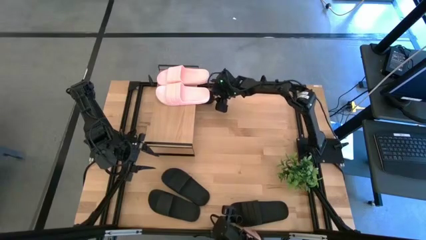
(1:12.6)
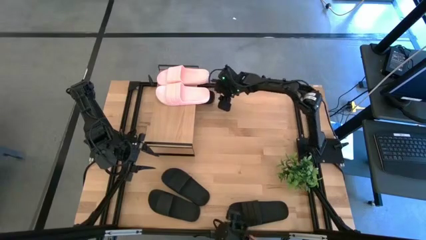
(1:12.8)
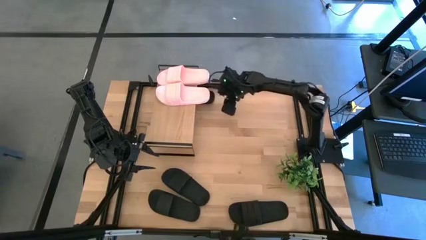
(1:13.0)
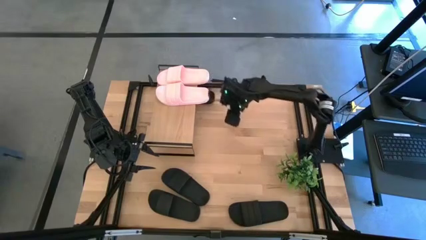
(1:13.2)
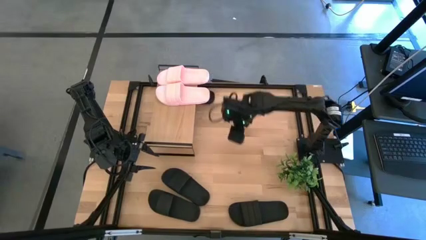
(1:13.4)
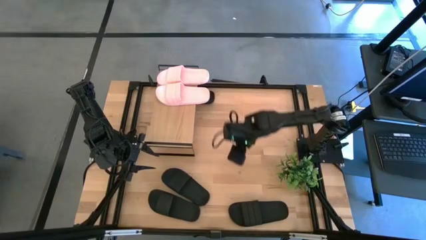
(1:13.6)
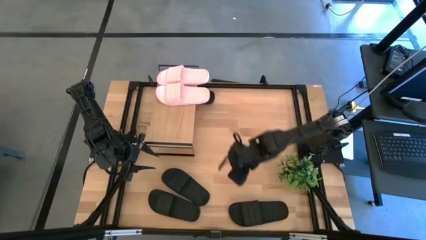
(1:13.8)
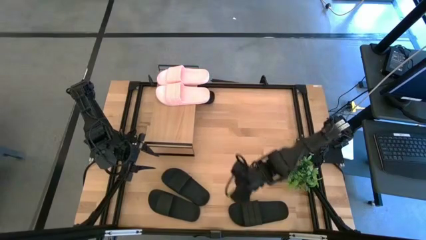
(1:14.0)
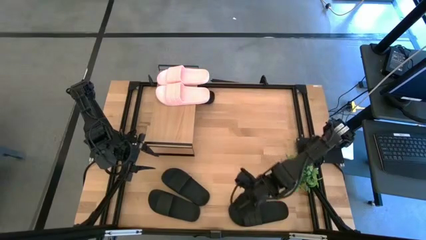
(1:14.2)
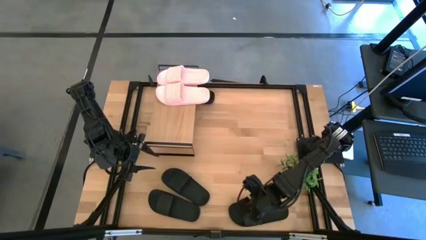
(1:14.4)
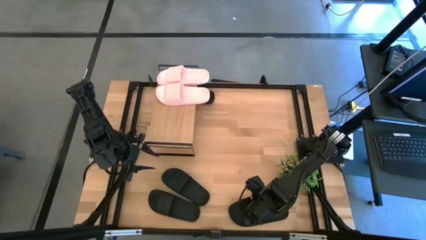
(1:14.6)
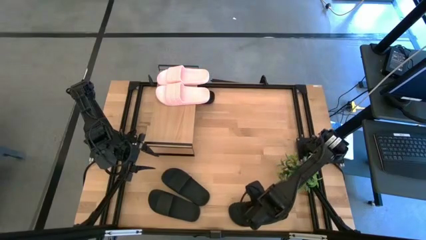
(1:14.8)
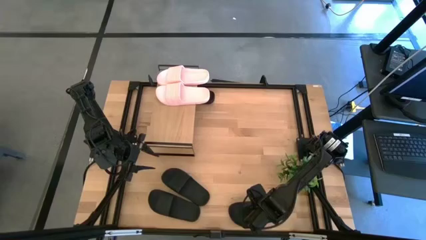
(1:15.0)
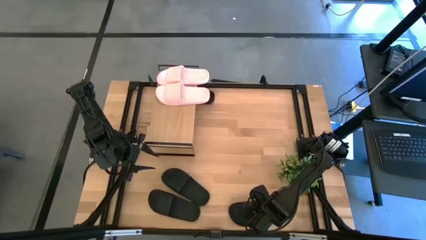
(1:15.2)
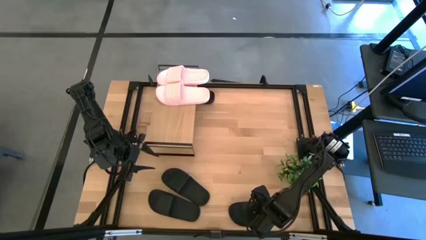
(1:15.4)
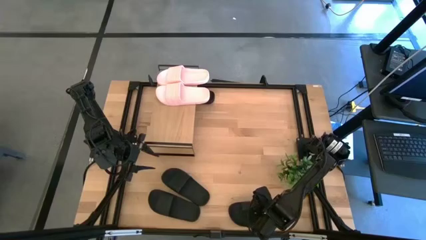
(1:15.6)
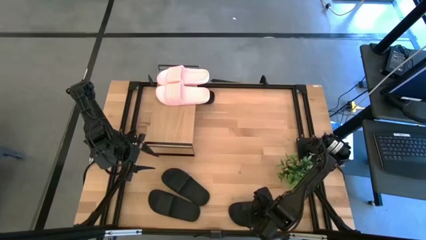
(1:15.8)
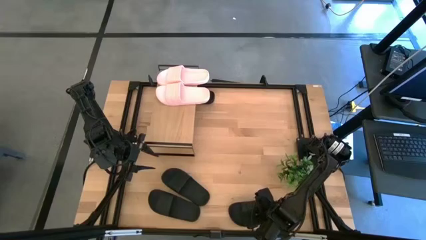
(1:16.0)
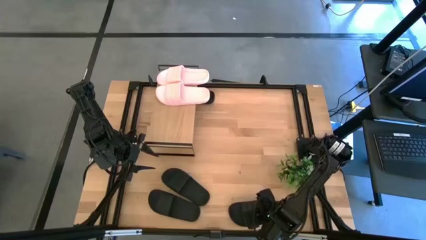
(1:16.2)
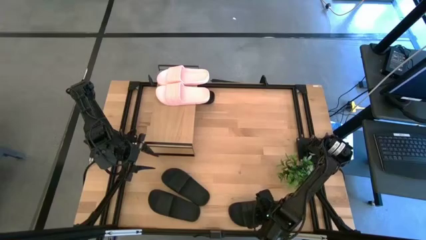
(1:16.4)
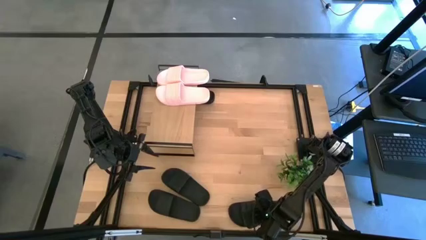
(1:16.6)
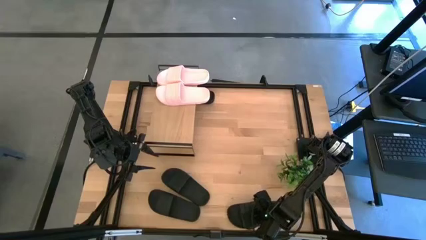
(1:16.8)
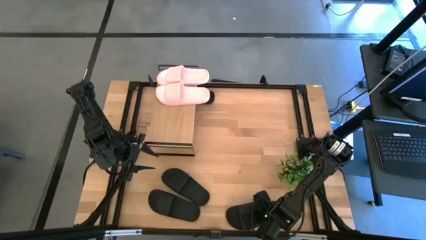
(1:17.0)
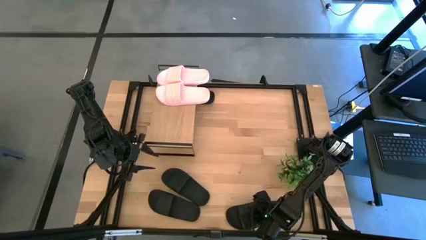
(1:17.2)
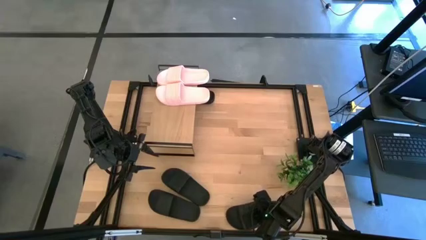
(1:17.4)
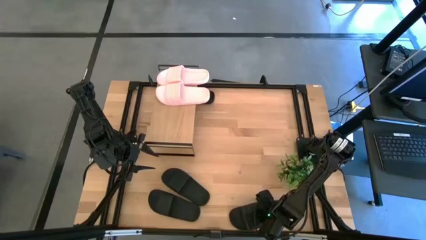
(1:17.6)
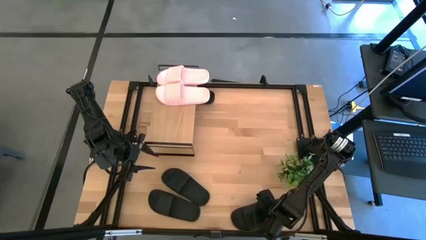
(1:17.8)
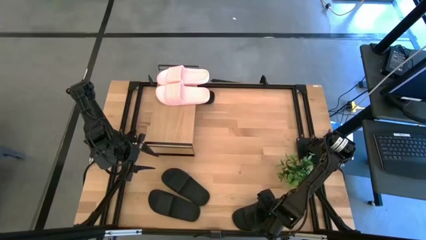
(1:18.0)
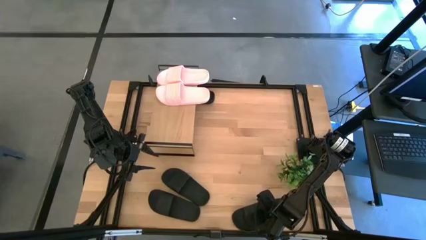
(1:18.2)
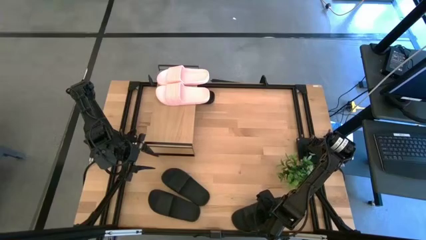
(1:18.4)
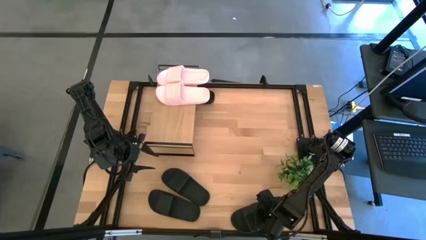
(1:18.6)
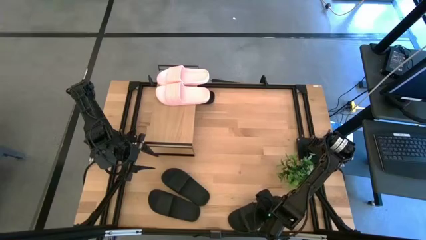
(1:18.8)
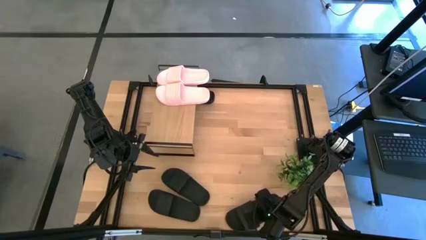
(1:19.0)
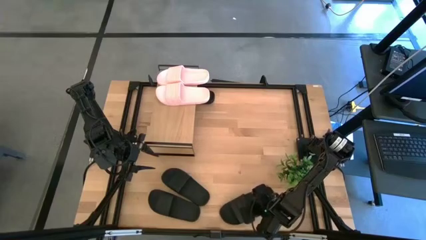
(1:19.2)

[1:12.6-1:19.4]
Task: Pick and place slides into the shelf
Put the bottom right black slide under the shelf

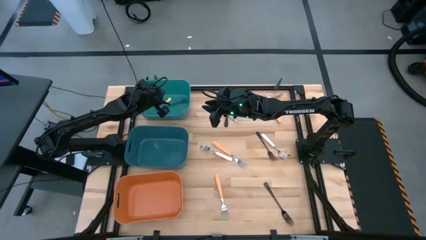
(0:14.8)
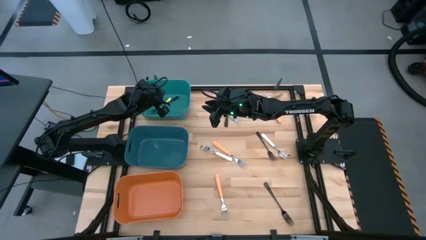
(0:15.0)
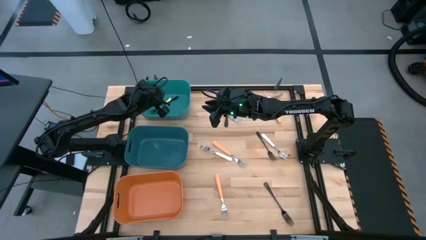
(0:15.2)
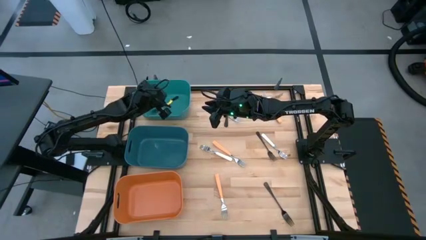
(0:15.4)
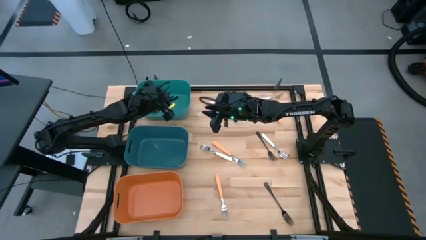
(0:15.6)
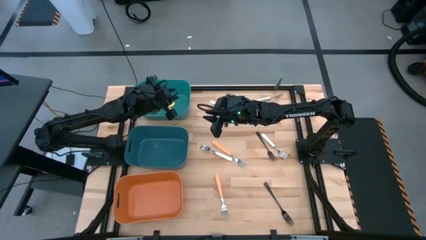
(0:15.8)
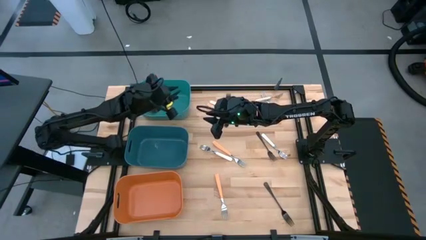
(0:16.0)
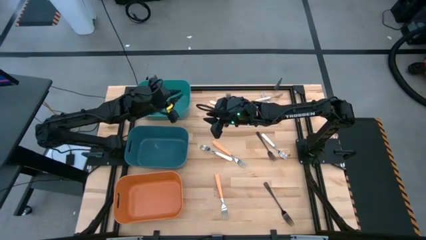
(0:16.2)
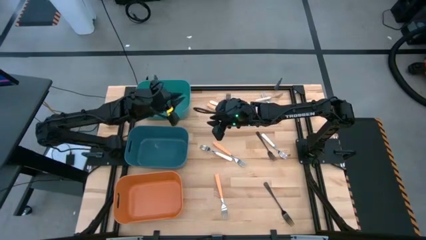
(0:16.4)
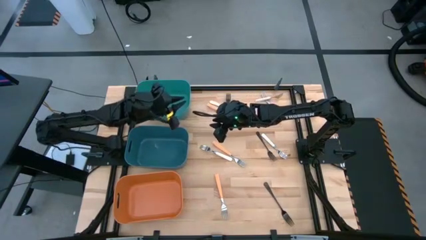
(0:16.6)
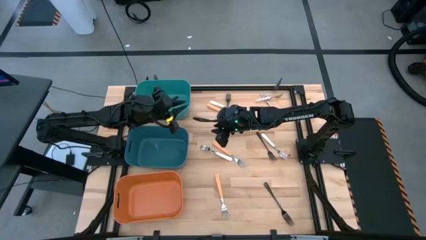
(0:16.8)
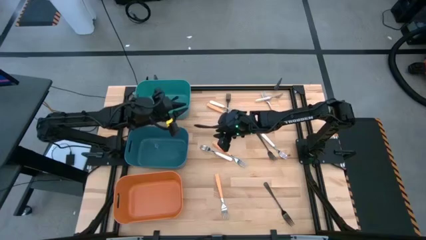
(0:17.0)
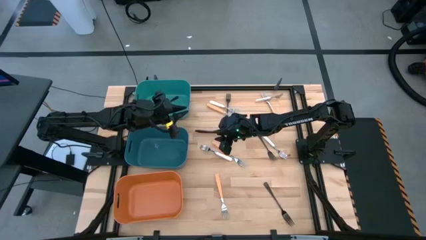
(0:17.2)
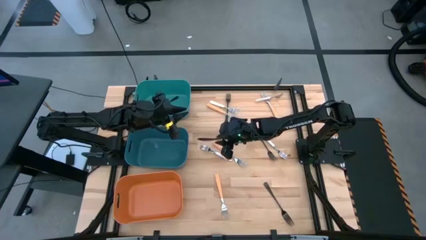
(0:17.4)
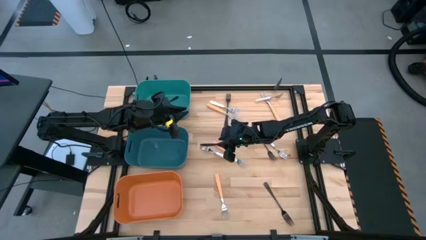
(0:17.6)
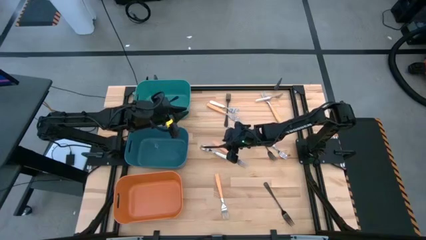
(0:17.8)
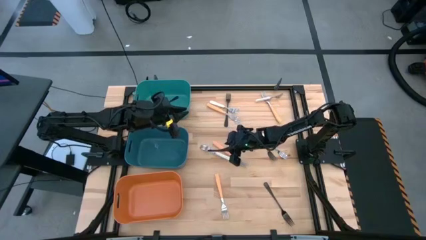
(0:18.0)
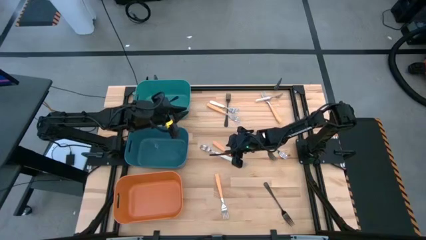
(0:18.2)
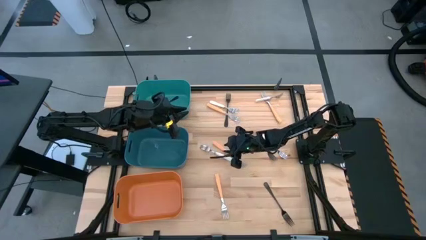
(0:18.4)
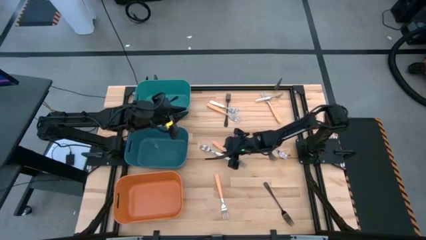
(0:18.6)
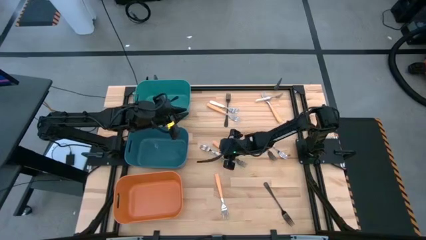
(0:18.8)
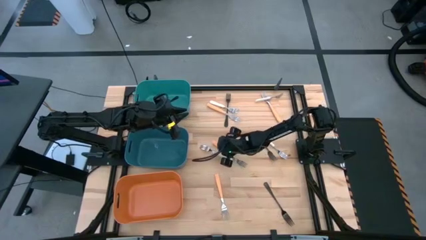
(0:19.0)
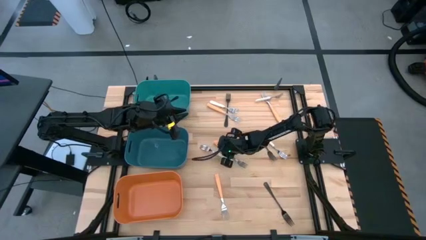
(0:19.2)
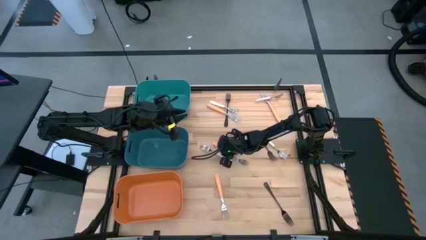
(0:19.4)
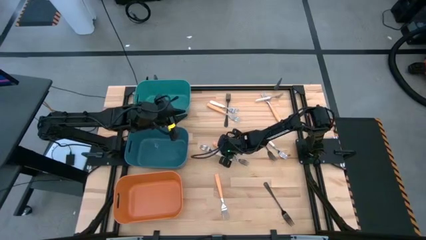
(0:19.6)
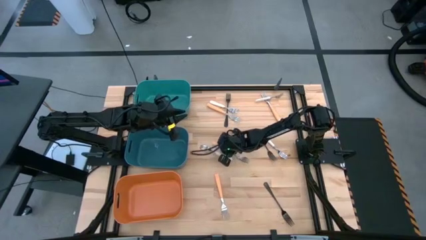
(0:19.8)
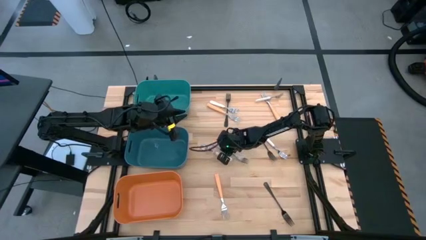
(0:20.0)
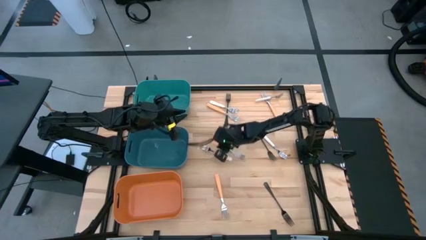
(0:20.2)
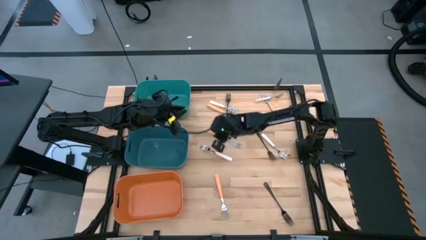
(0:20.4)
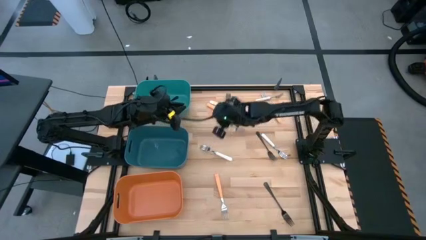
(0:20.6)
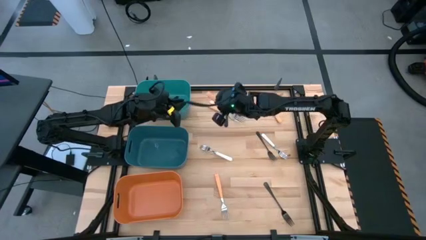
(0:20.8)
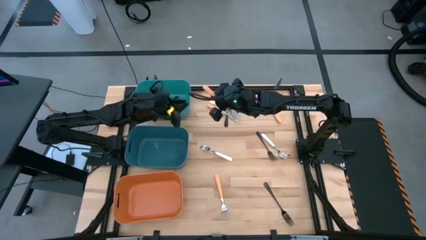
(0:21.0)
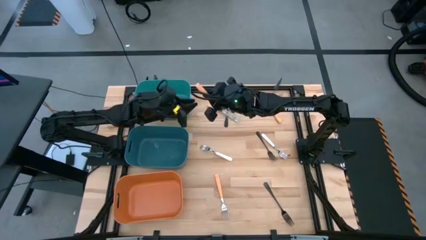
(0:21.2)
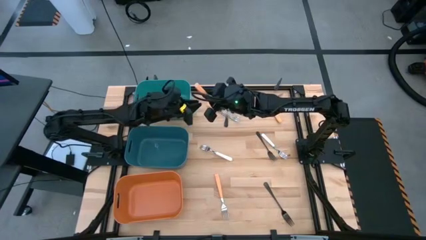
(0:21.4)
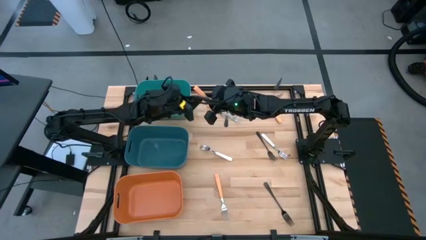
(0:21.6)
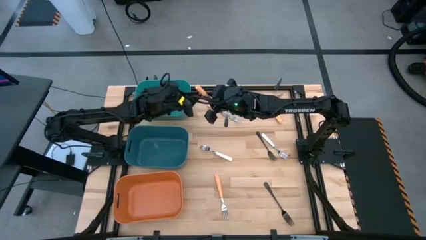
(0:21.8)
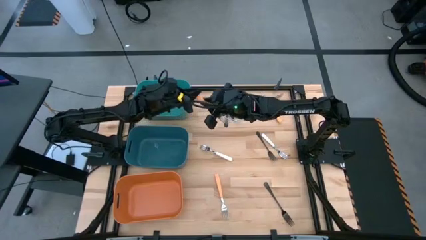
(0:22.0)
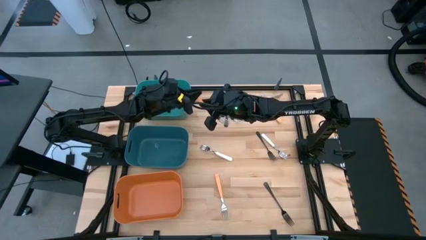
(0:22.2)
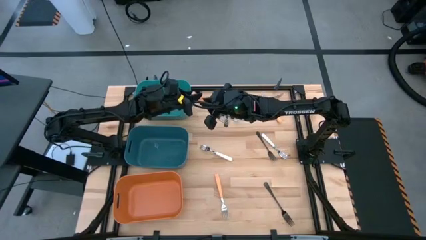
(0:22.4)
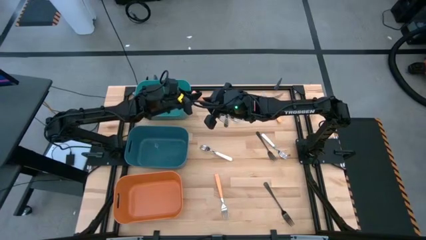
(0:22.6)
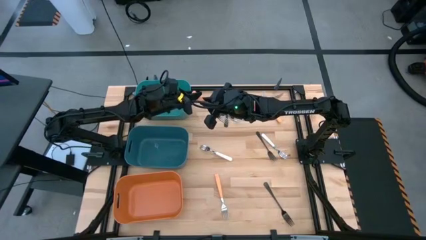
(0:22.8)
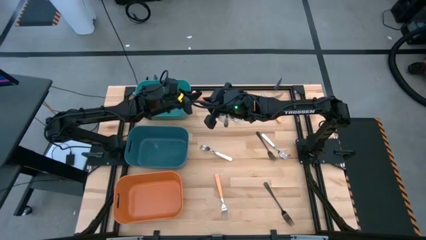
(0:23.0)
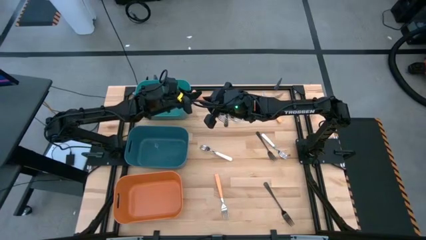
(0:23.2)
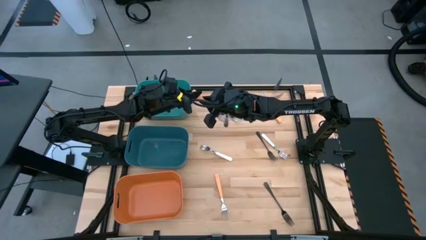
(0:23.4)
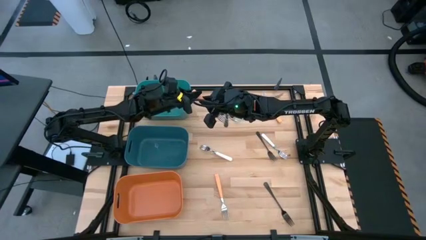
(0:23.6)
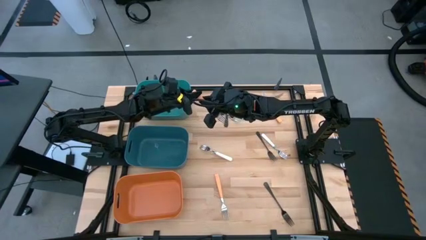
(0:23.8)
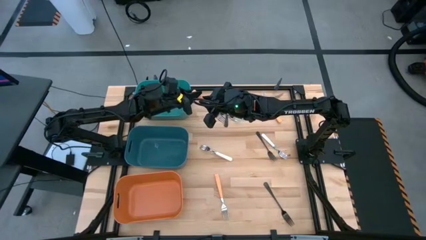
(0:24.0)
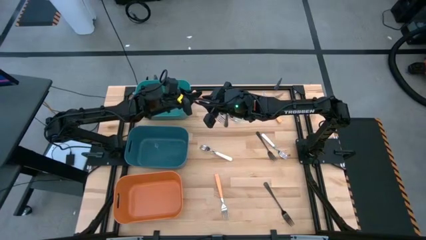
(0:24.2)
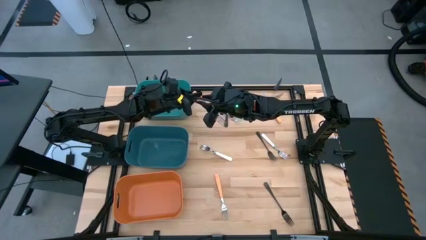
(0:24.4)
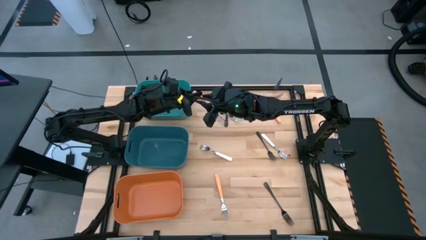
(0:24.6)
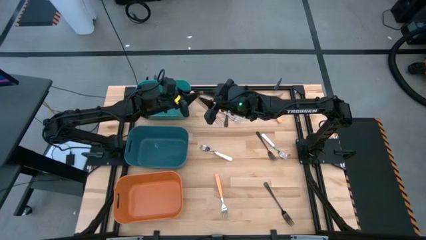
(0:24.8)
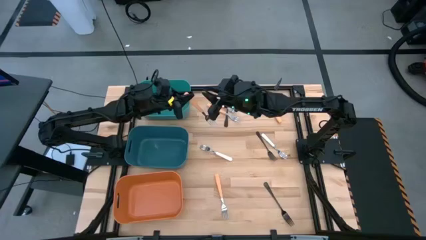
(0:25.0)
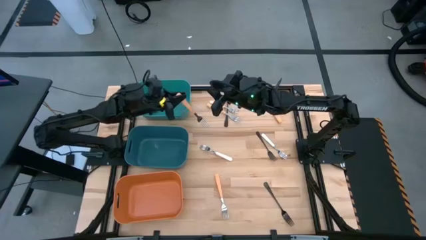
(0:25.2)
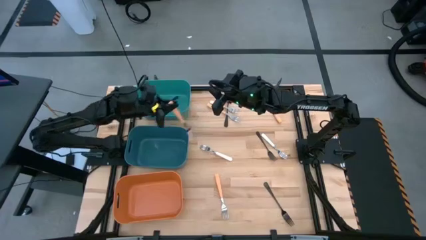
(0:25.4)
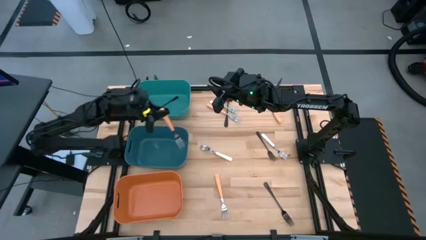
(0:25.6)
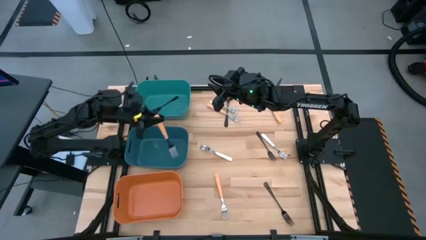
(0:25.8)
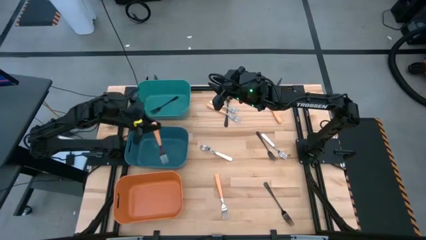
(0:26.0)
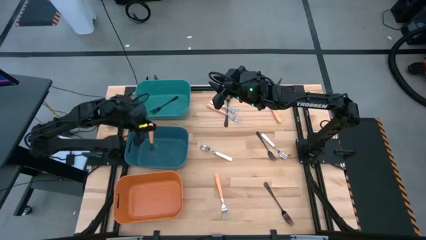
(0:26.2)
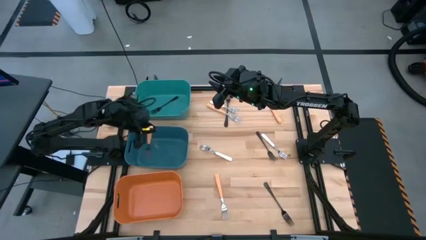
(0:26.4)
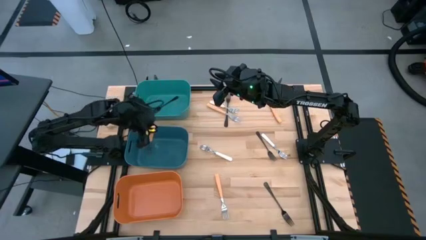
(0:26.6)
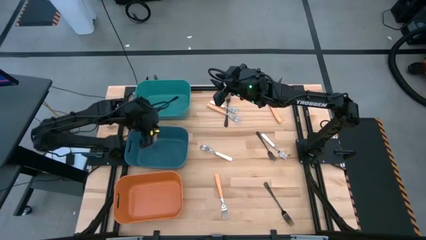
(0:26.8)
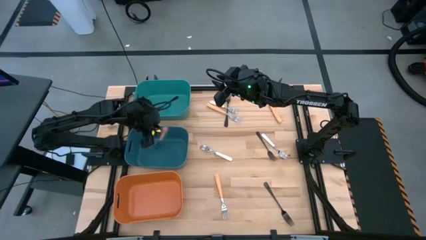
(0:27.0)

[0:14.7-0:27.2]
Task: Sort silverware by color (type)
Put the light orange fork into the blue bin
